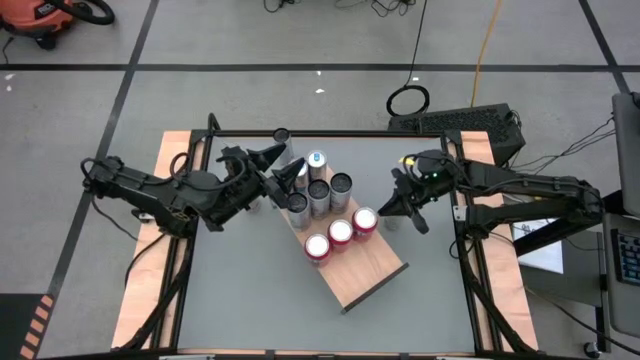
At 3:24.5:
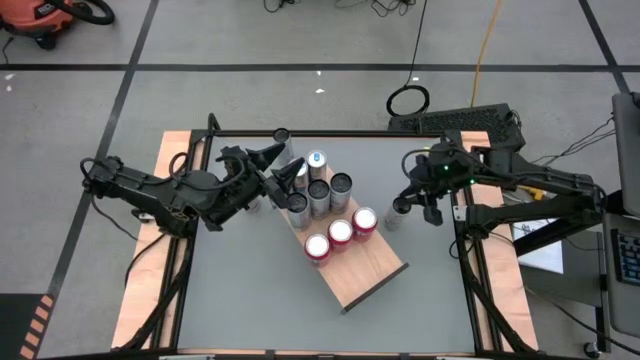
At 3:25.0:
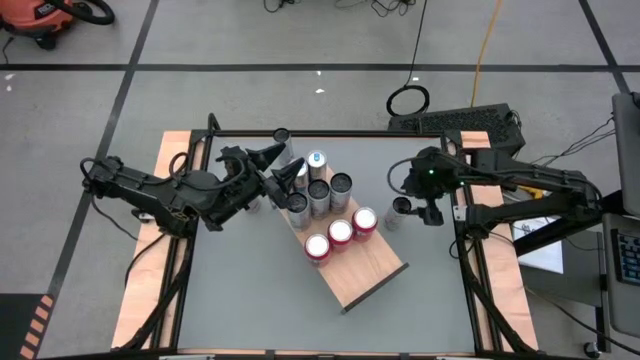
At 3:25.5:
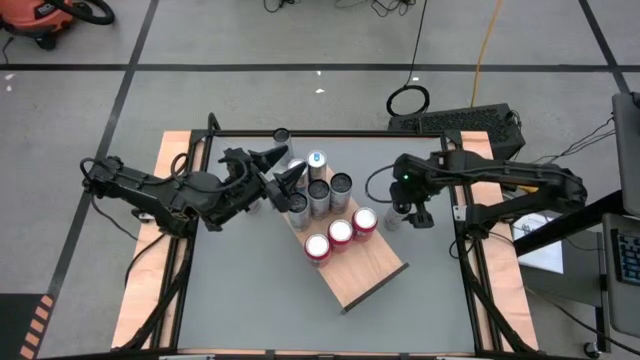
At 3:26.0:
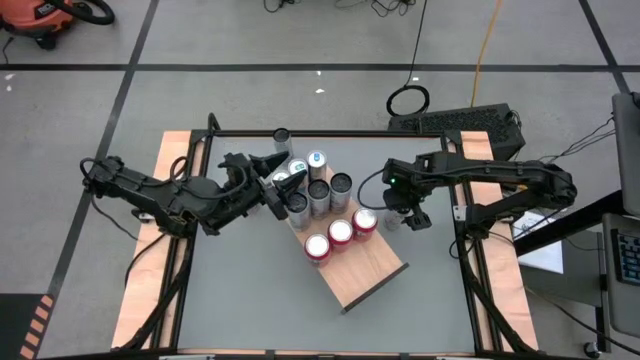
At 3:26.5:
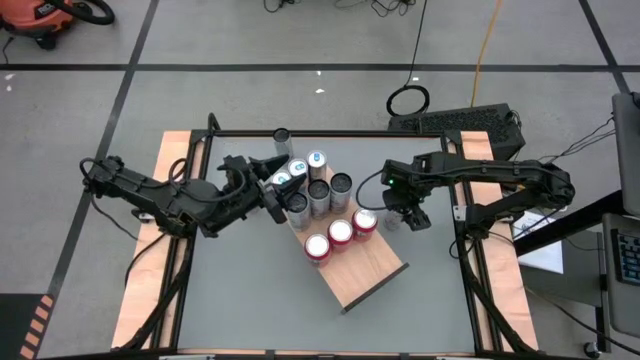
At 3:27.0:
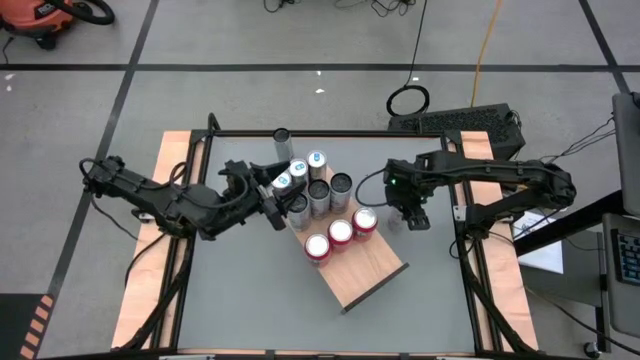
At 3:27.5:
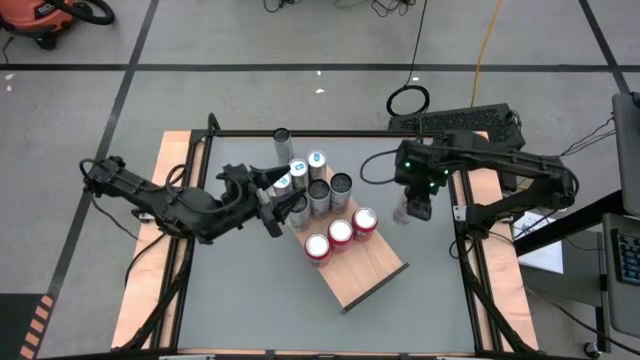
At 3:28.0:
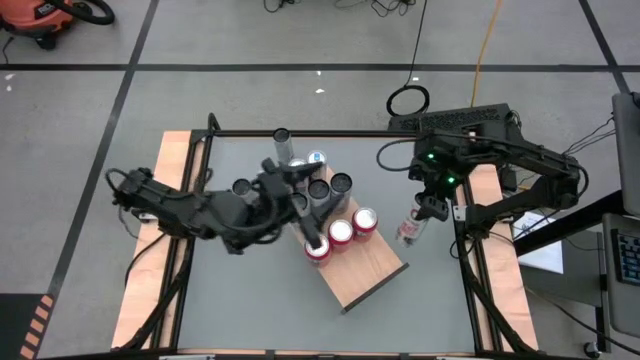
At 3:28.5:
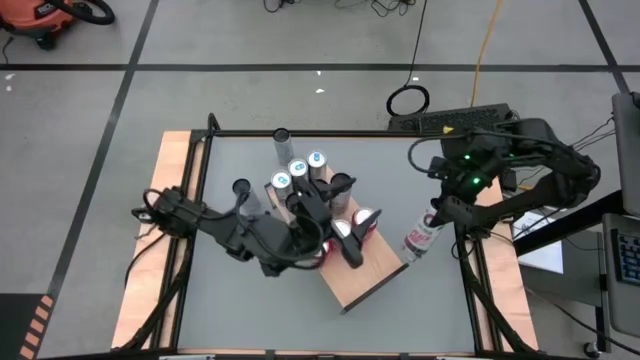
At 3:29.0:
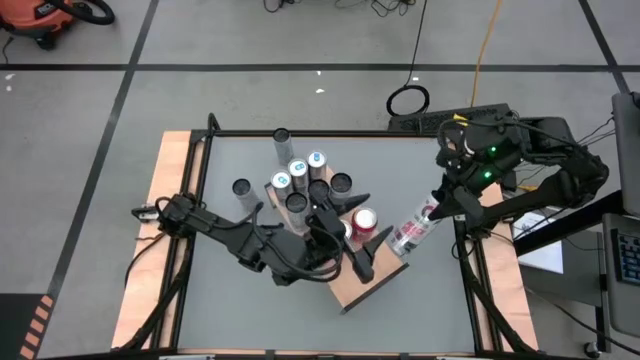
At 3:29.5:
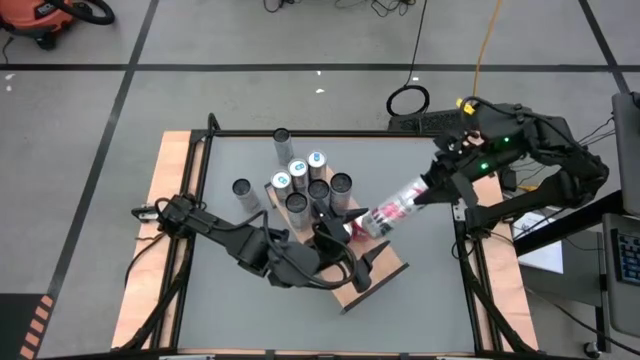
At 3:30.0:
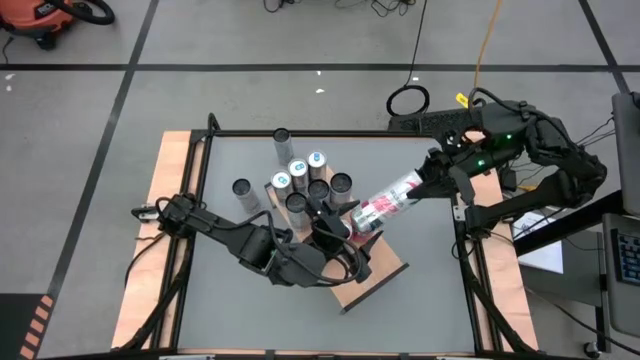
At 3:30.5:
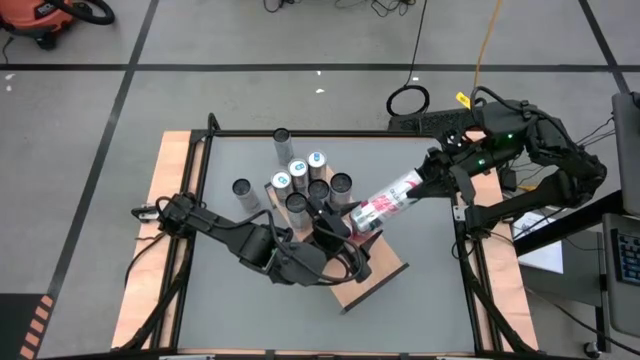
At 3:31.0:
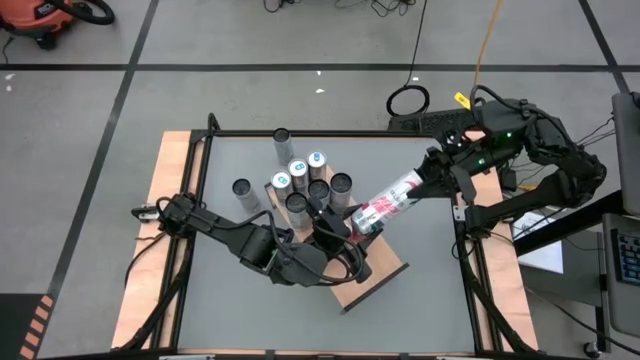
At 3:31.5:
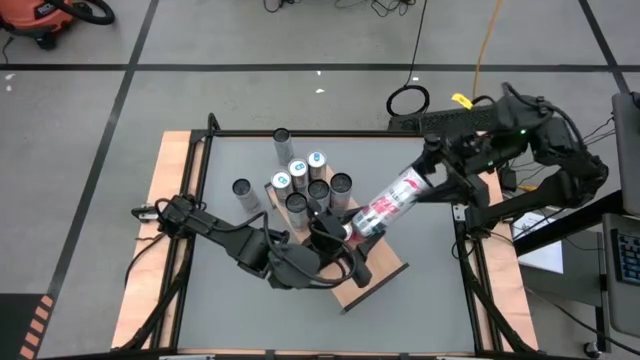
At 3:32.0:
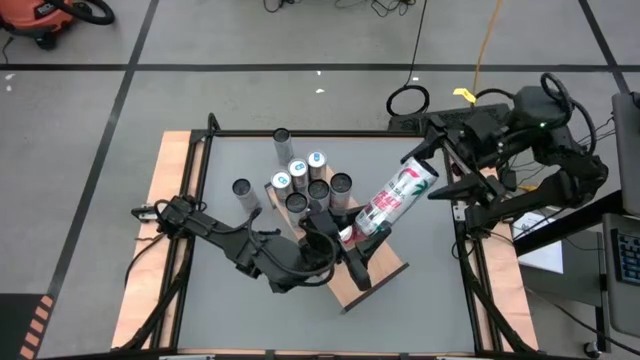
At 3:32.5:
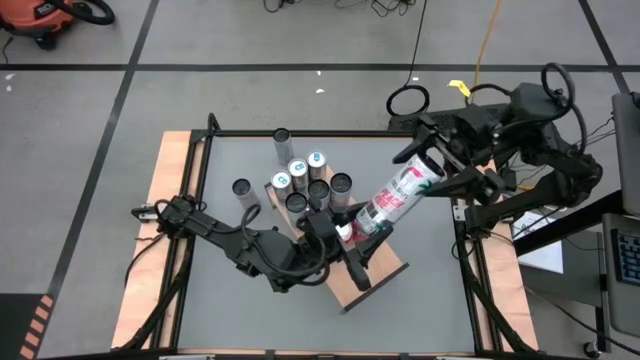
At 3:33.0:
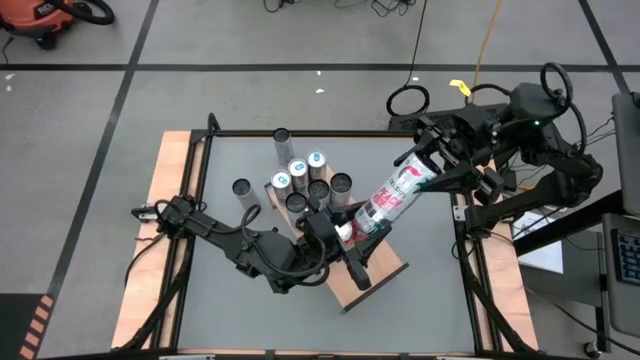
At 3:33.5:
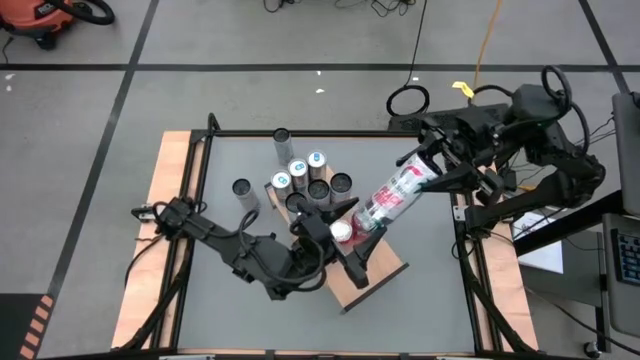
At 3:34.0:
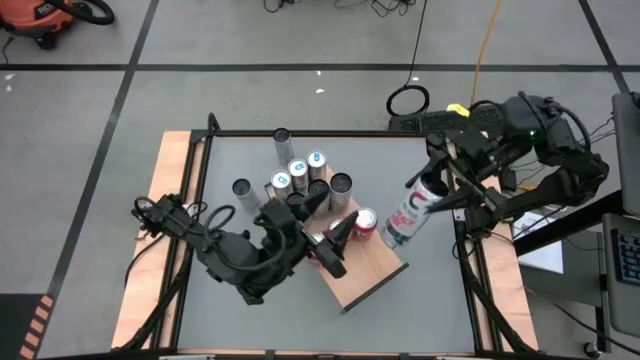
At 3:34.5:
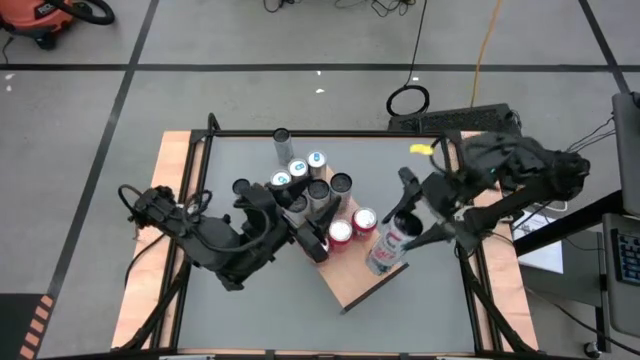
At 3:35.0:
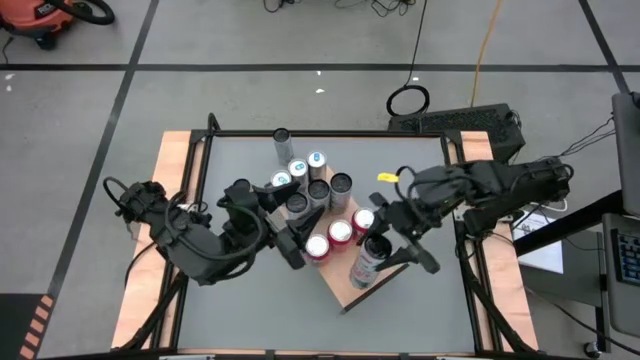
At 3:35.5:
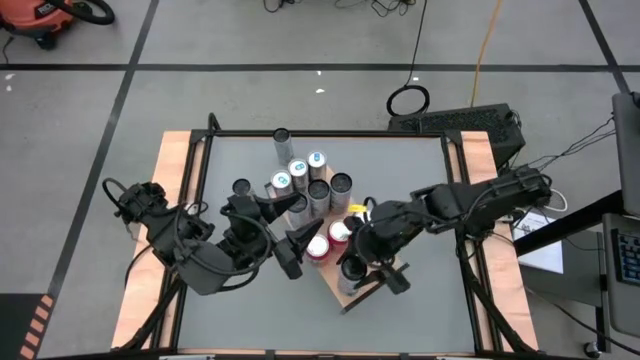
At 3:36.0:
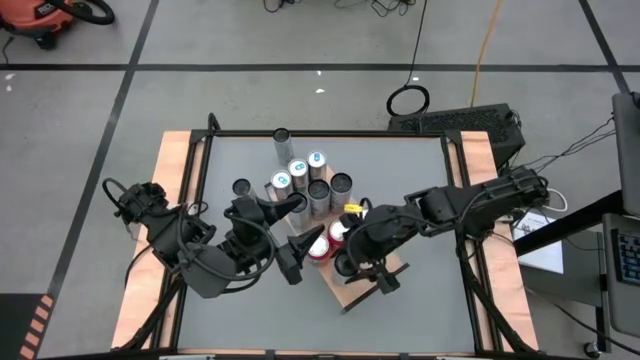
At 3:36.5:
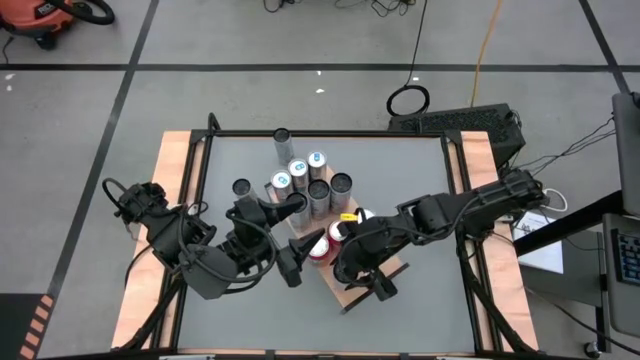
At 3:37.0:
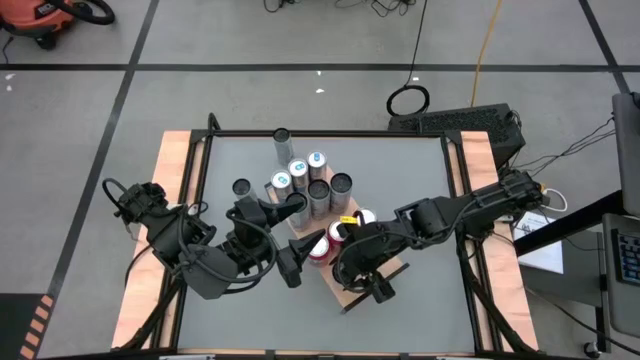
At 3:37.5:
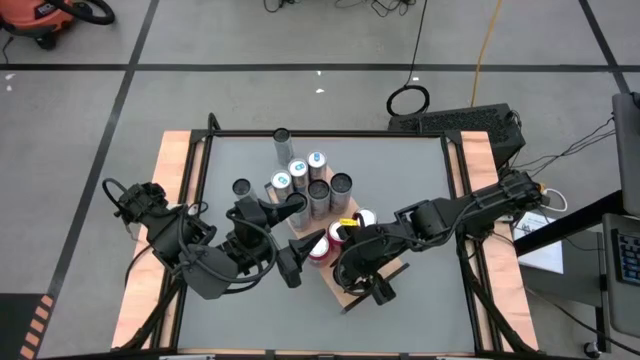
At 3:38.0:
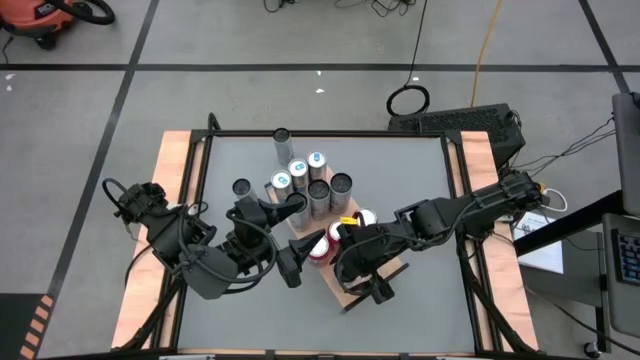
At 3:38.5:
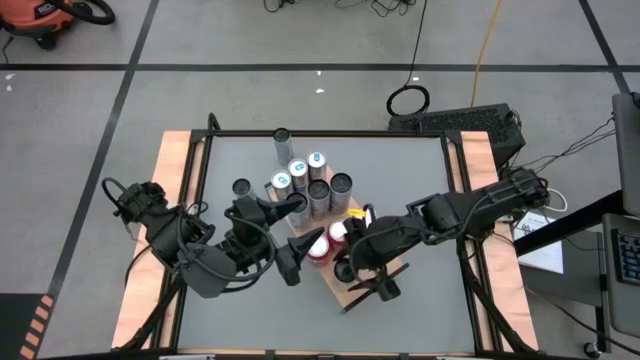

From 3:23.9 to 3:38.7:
Task: Place canned beverage on shelf
Put the bottom right red soda can on the shelf

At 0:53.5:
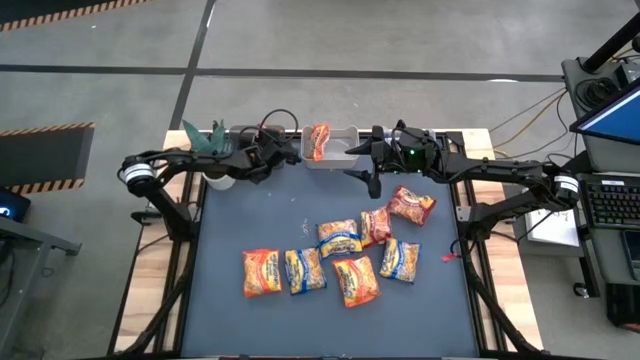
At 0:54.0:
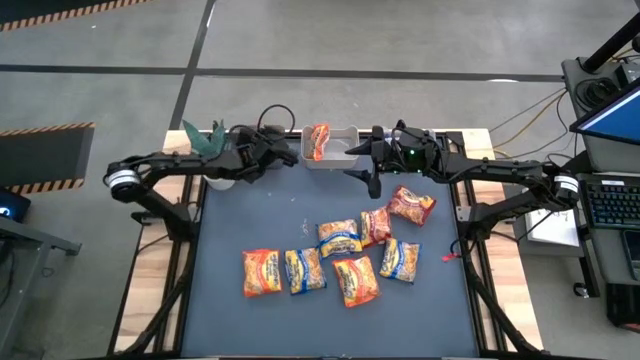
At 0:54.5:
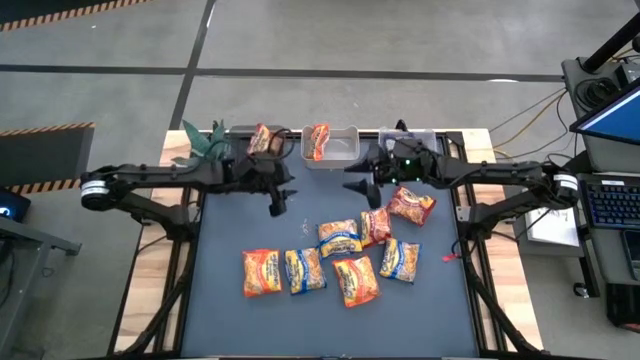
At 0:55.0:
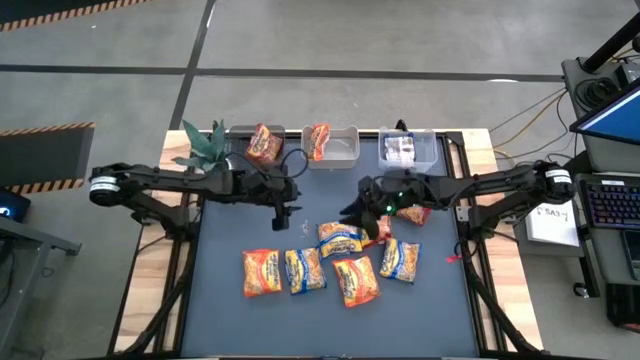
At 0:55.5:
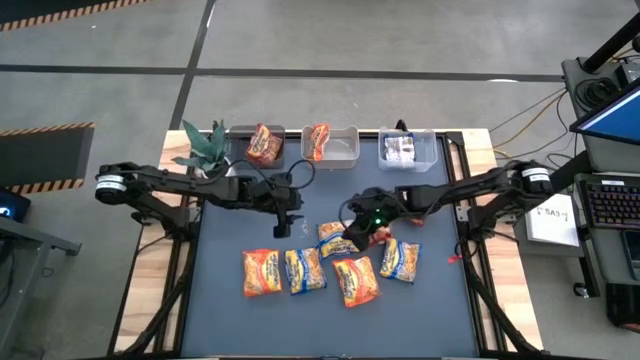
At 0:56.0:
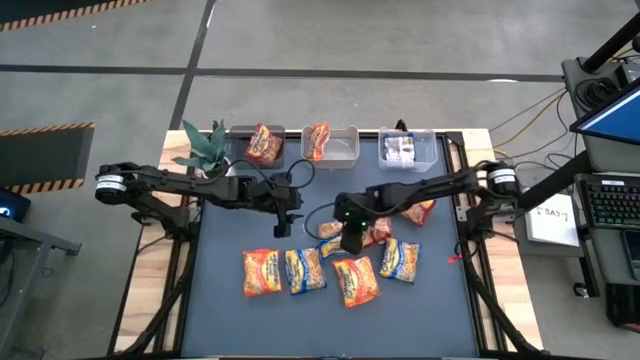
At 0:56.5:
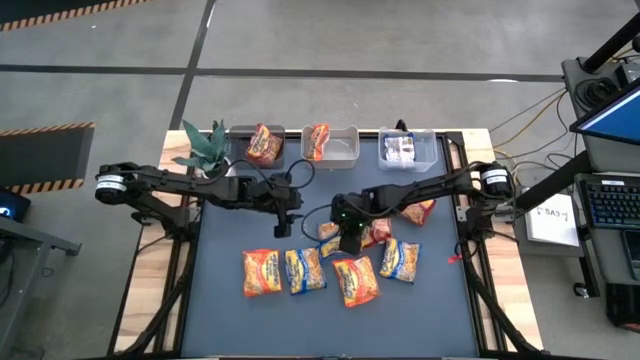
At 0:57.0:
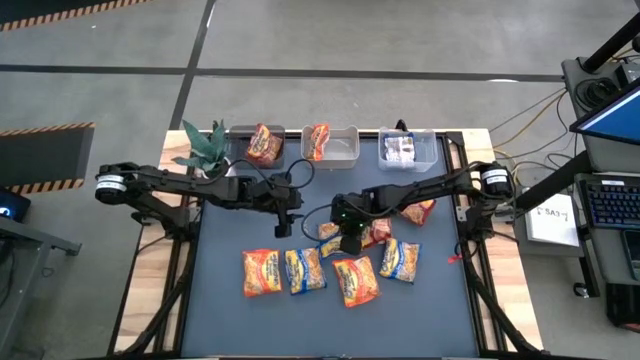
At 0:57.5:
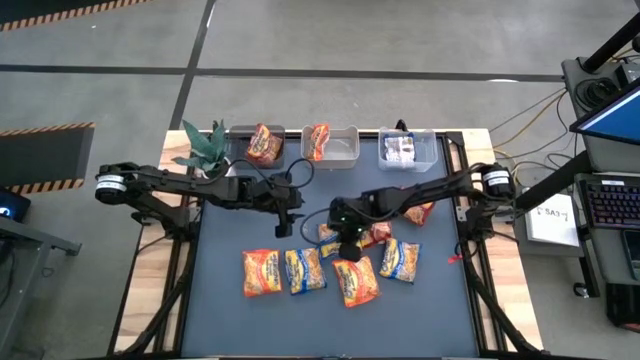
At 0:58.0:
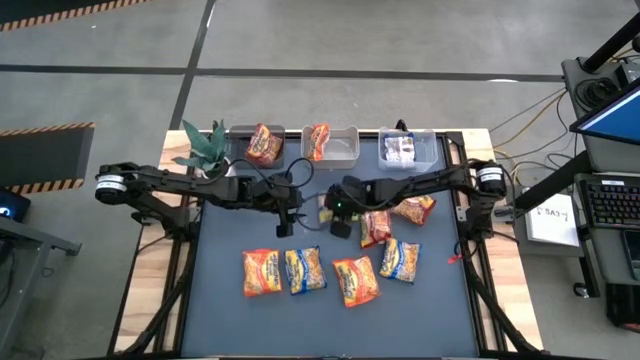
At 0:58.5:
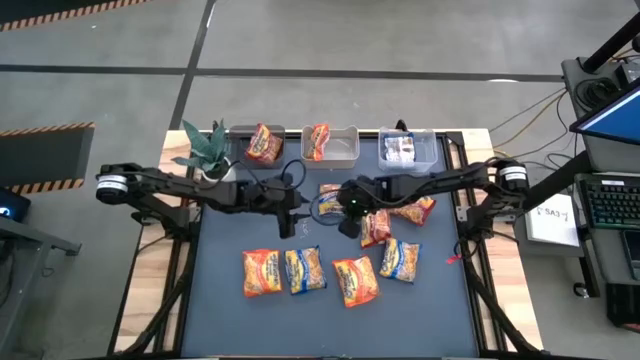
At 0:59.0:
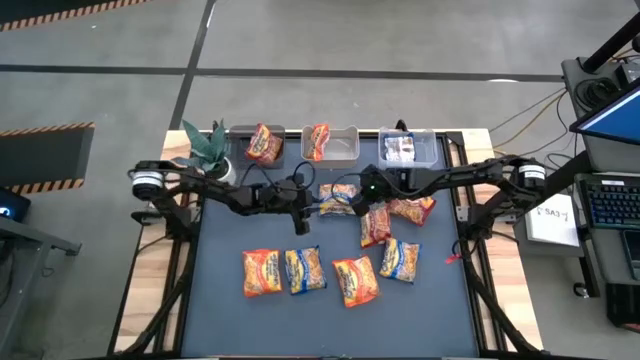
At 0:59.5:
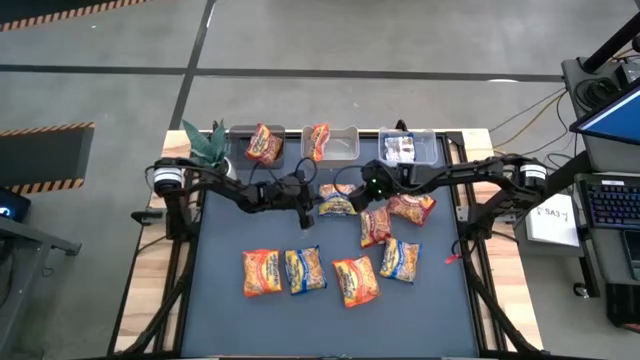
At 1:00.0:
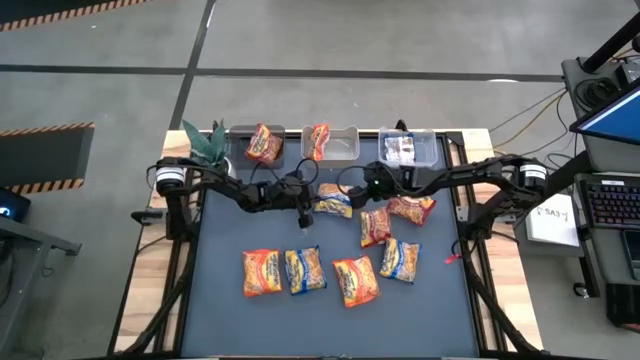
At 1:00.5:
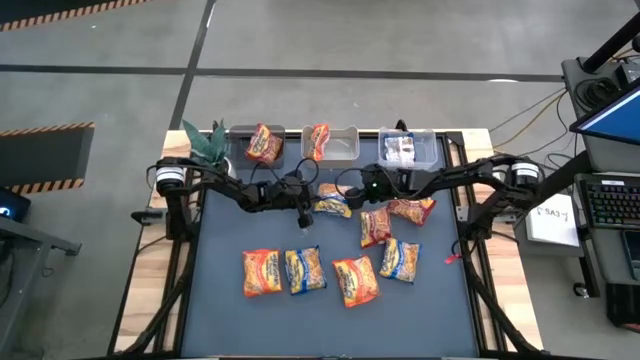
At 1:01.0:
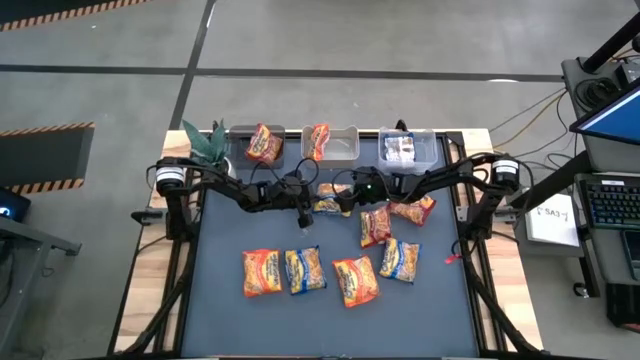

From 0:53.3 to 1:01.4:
Task: Sort Maruchan noodles
Put the center blue noodle pack into the transparent white bin
